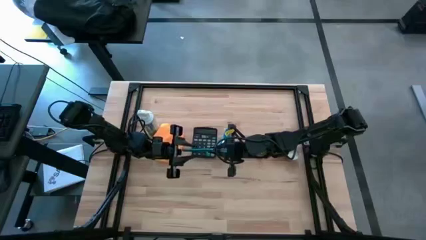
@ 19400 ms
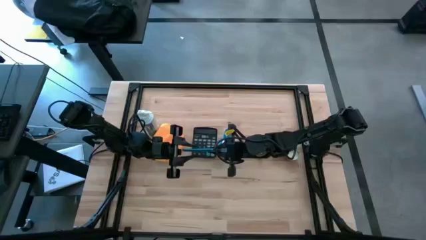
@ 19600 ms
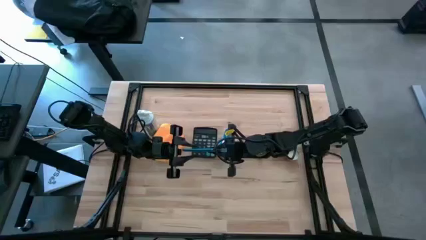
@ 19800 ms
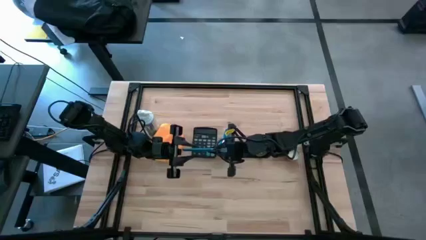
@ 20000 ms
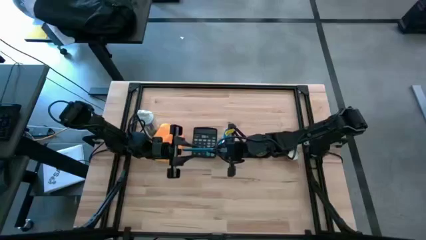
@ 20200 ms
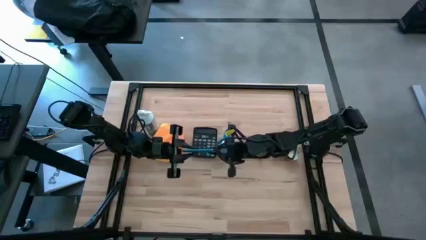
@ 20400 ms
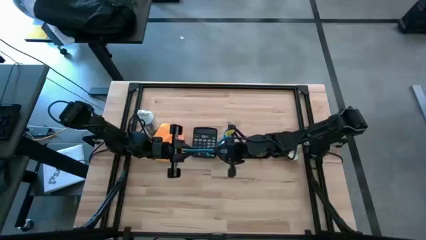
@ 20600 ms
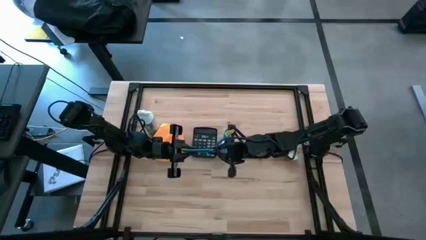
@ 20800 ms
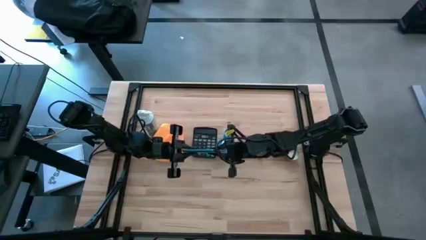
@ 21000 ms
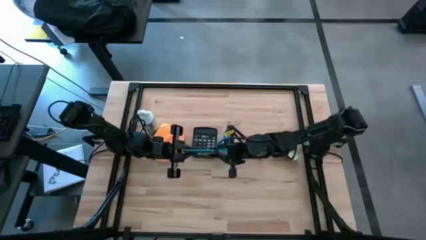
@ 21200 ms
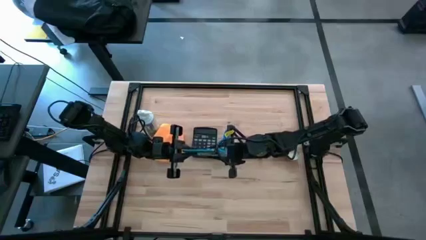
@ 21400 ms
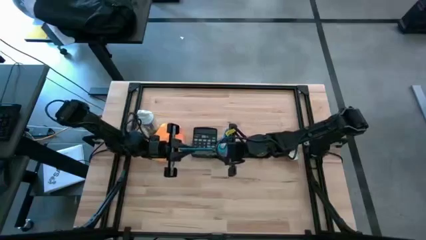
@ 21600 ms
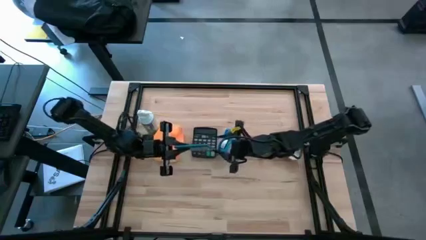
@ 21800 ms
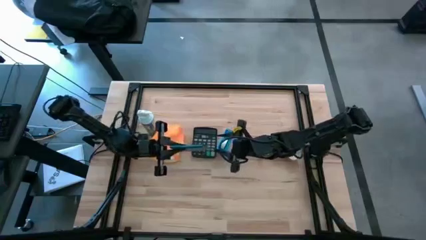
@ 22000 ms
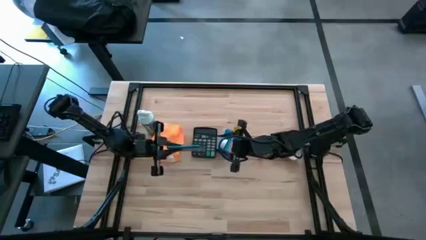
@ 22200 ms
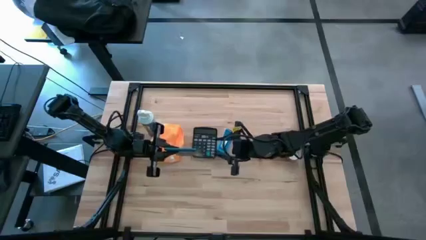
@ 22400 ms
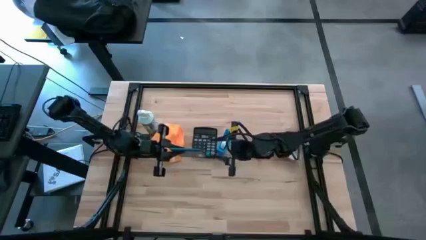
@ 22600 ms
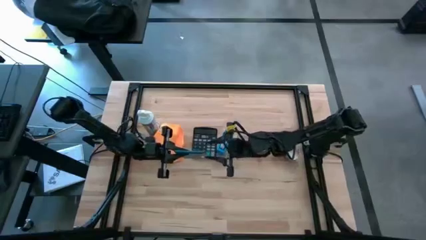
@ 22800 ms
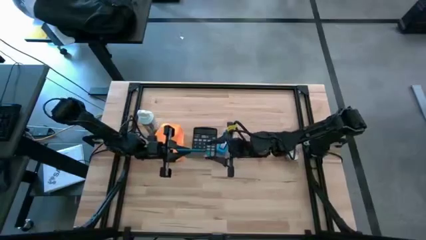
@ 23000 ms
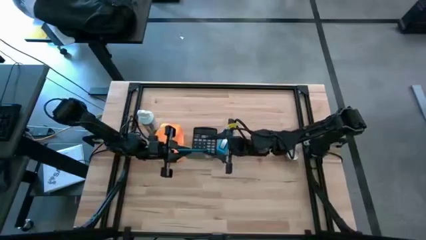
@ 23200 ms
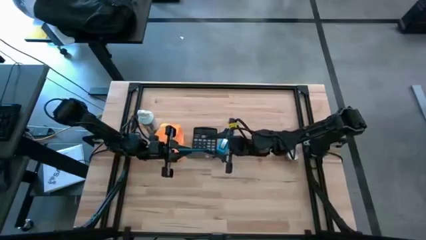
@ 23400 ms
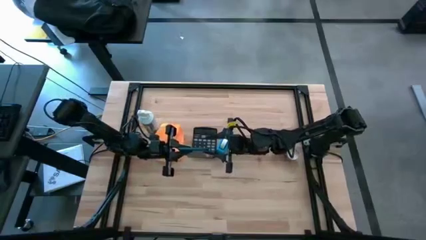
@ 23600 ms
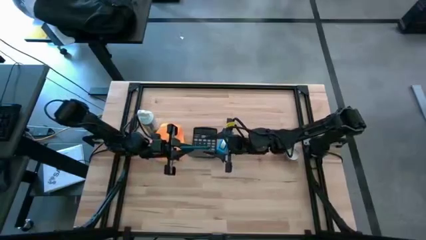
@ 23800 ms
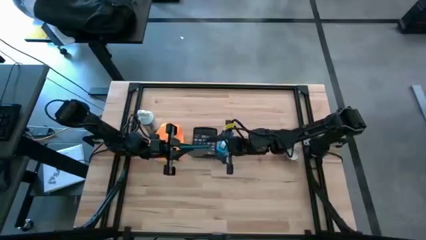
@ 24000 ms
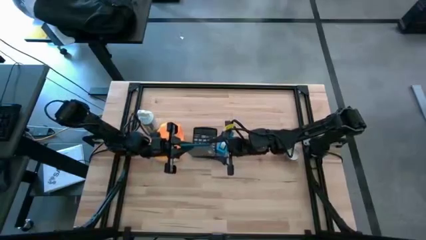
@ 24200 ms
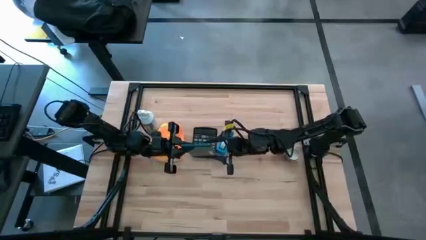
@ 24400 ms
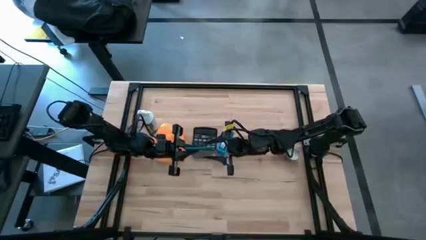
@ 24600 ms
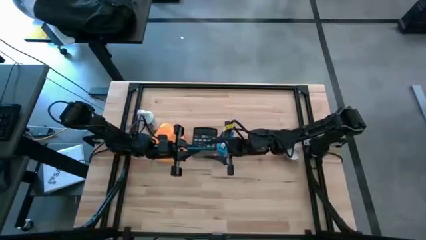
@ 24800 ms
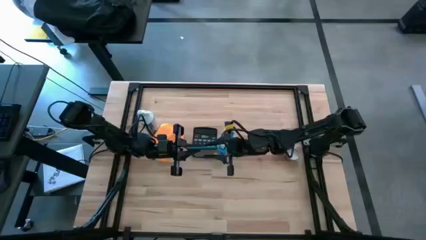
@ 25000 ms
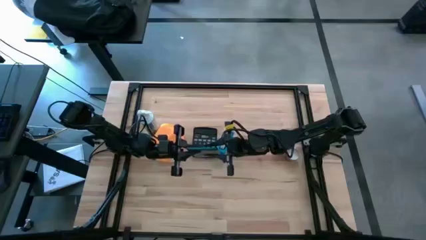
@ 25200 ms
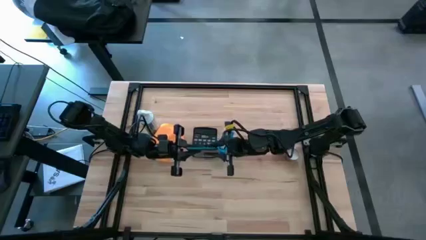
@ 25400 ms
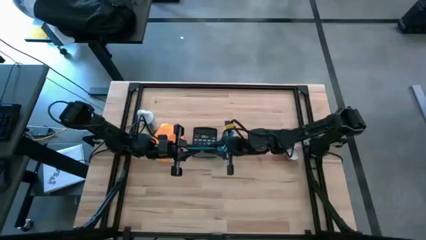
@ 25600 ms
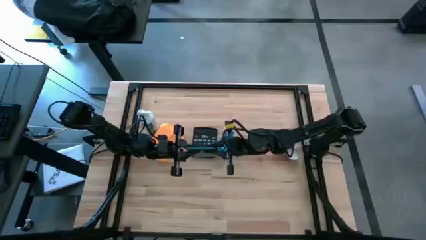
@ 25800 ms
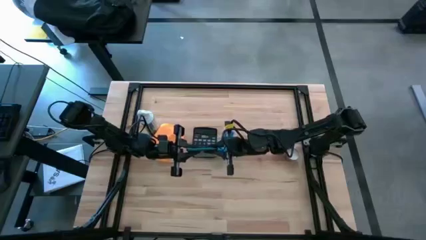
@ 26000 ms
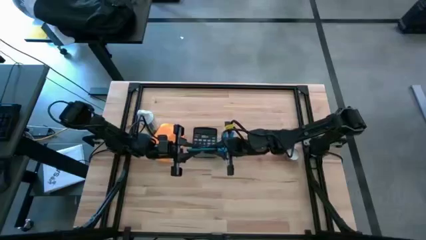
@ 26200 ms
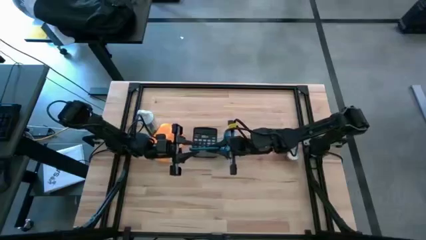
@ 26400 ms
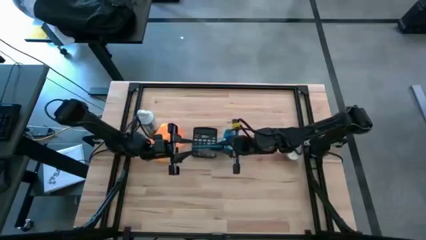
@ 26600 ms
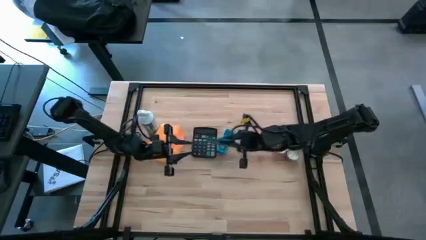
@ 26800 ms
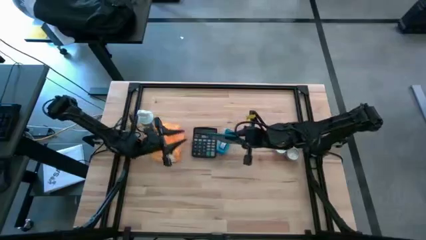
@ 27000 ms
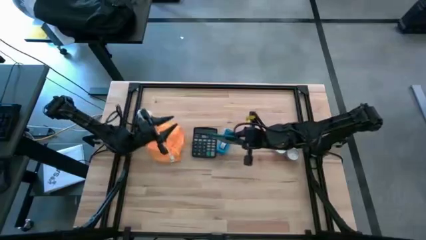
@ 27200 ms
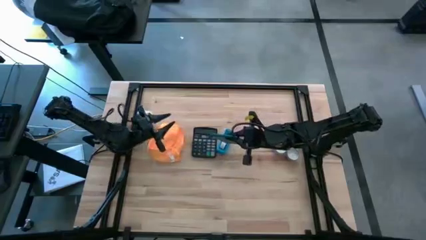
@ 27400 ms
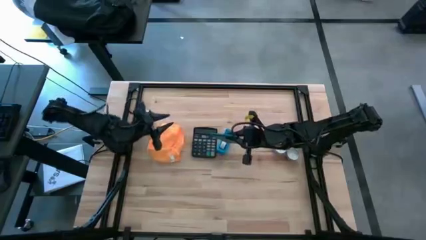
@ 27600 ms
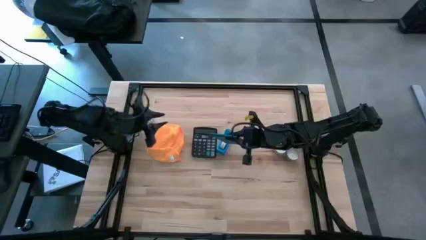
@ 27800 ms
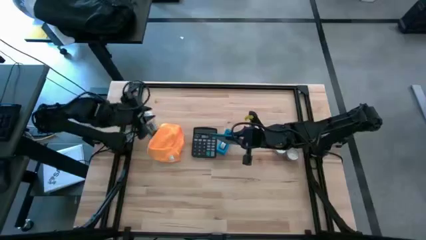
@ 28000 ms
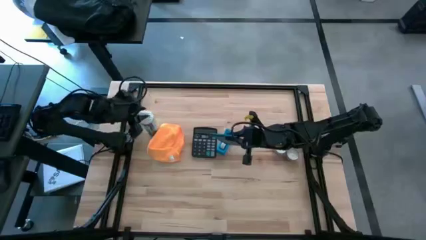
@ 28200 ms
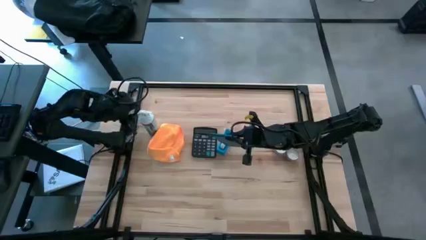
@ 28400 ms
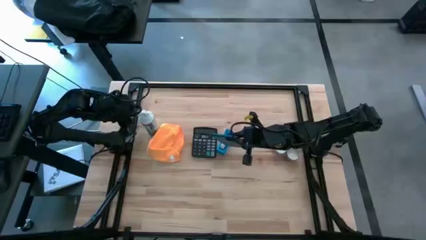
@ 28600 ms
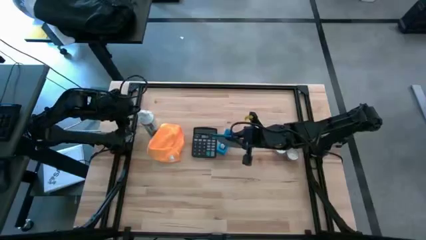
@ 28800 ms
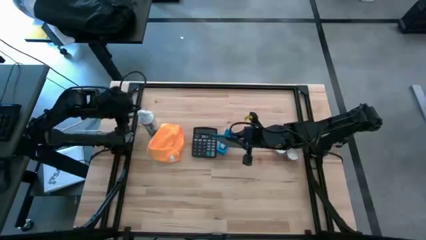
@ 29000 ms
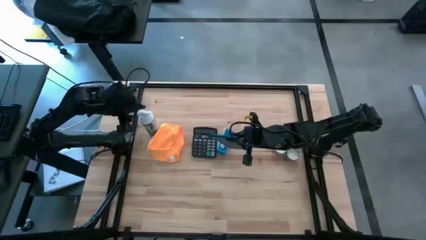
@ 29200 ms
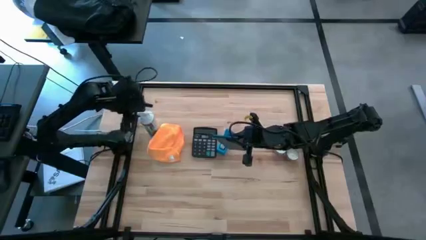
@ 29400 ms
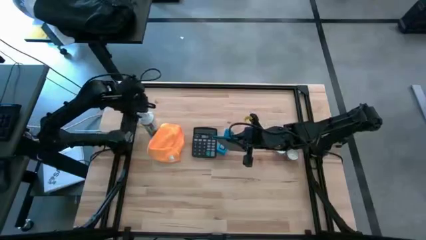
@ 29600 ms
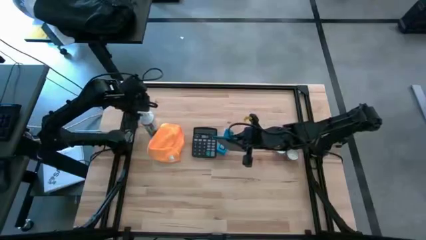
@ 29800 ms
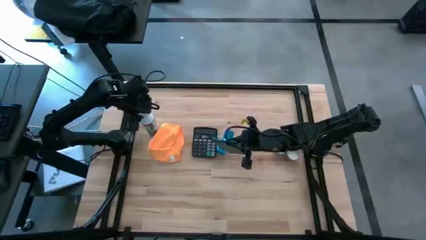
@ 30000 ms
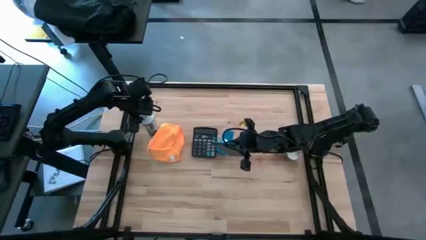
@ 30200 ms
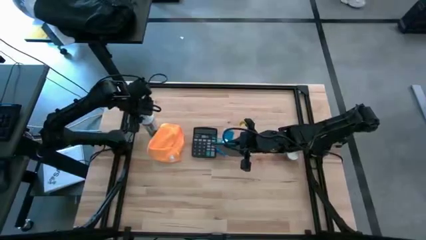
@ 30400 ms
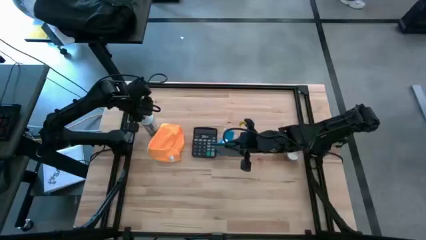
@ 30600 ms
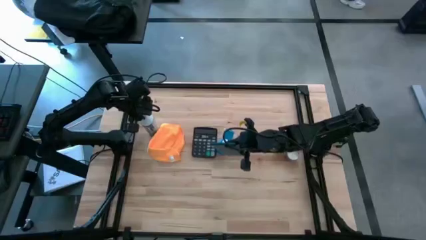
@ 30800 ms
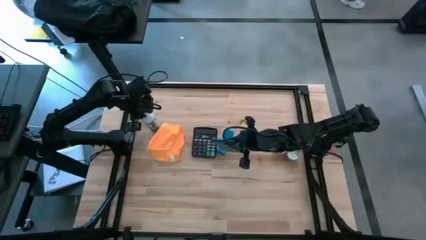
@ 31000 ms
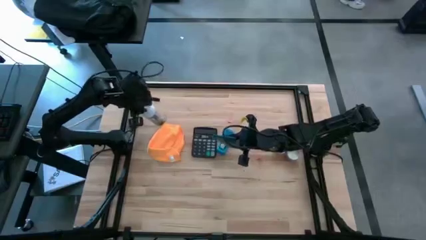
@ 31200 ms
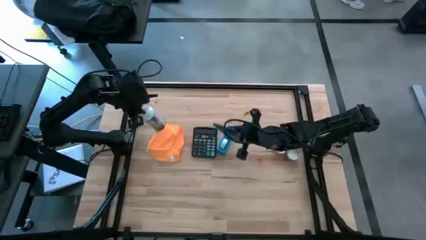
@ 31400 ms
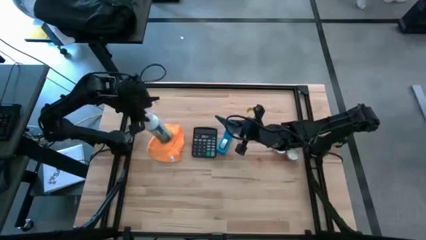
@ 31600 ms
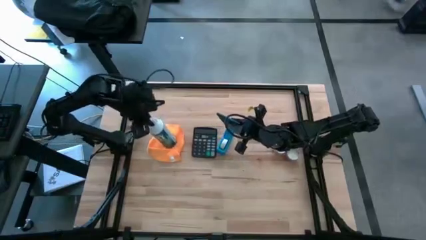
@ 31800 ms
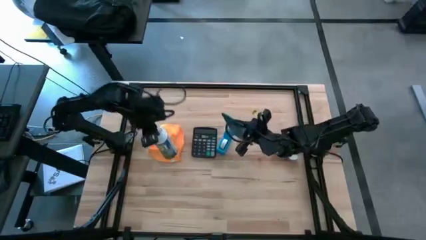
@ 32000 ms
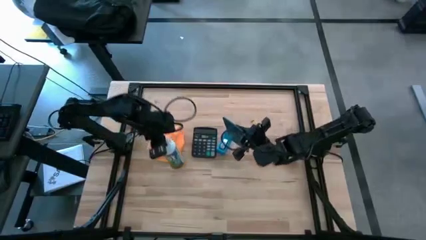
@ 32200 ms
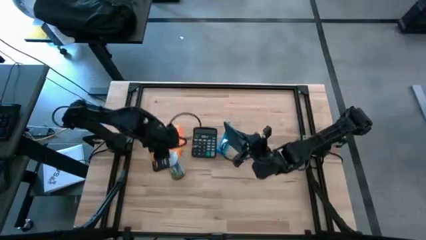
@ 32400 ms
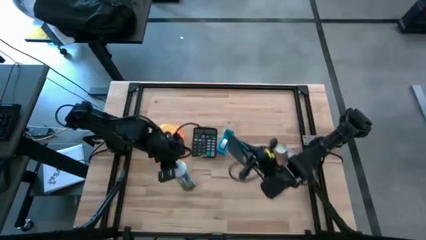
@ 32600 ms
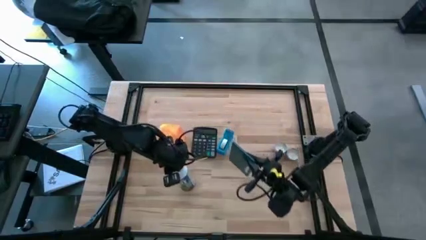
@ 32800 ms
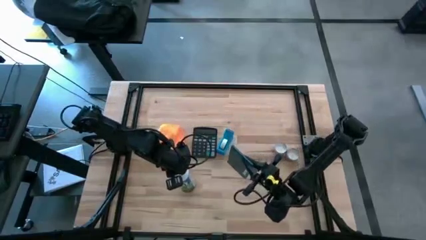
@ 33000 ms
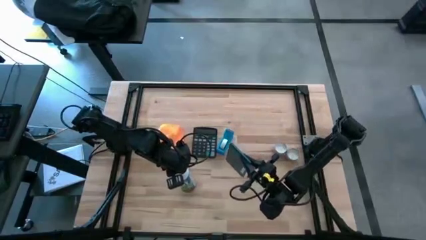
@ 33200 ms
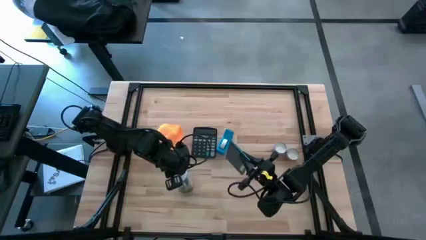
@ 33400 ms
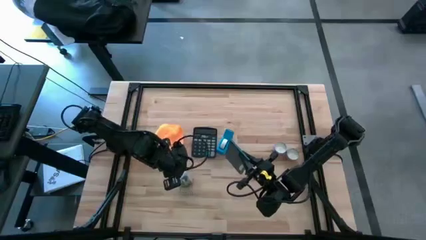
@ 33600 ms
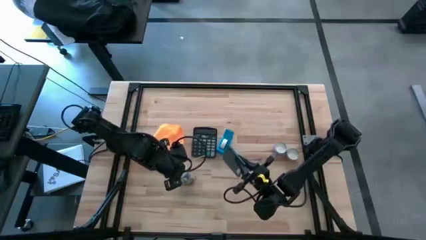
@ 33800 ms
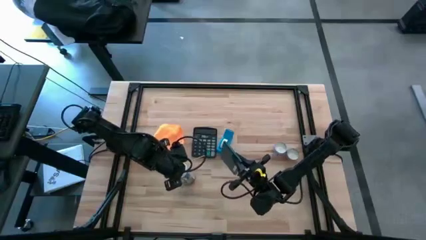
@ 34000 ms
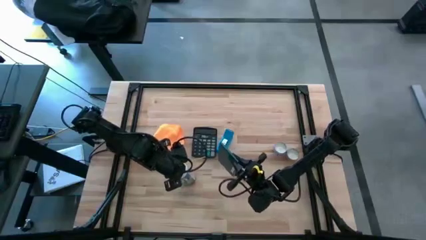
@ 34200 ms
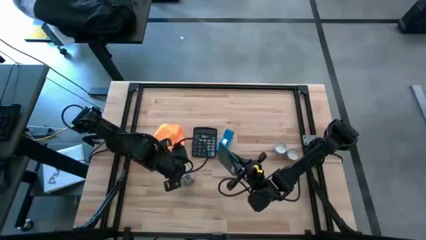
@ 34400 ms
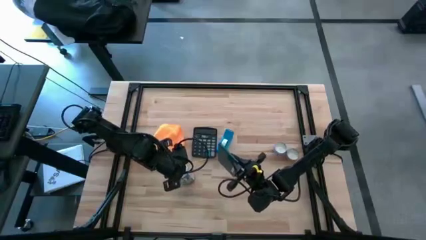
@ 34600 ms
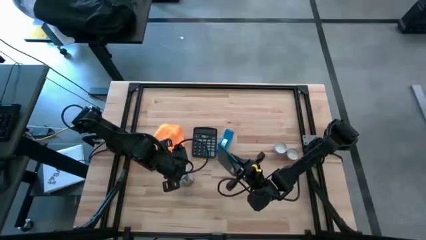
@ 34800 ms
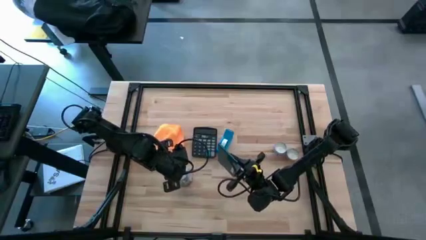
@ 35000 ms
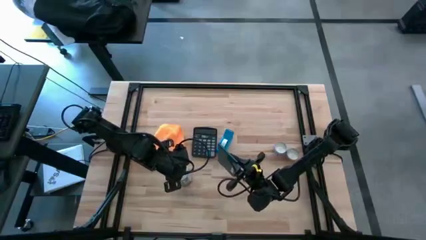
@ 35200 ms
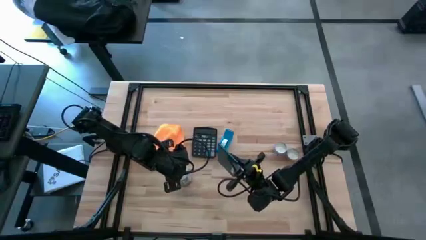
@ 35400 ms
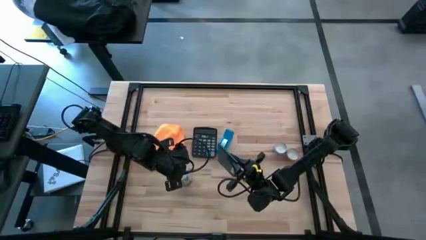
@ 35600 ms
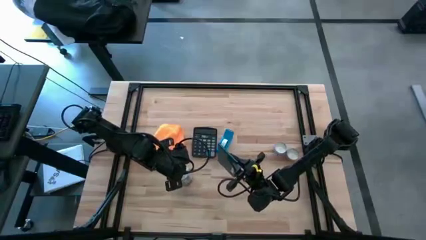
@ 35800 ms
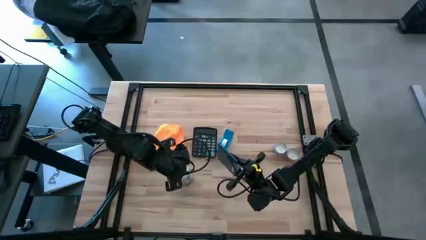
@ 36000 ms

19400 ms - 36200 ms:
Task: Apply microfiber cloth
Wipe the tablet with the orange microfiber cloth
